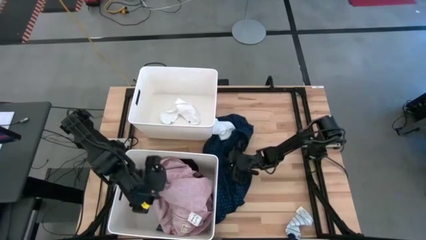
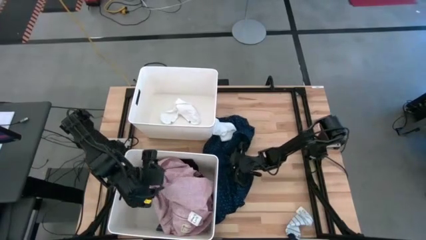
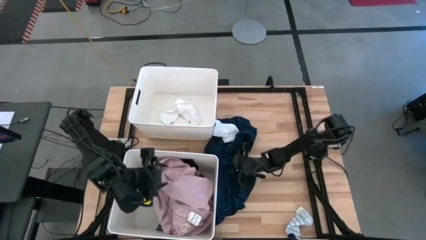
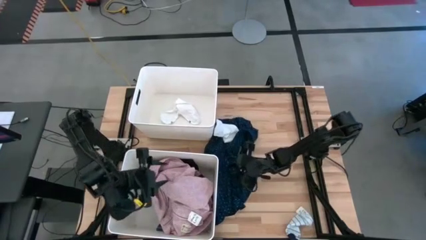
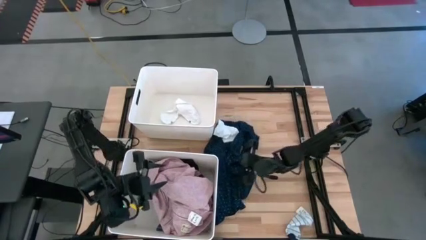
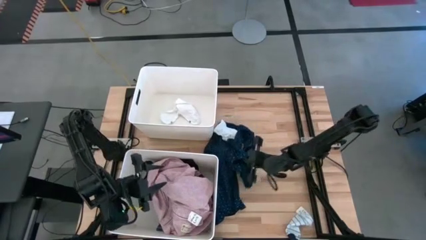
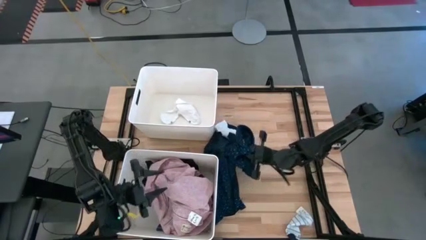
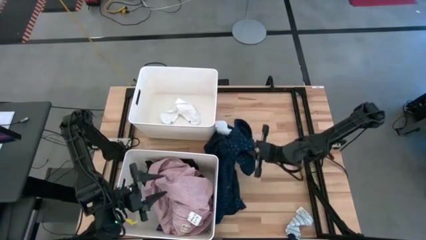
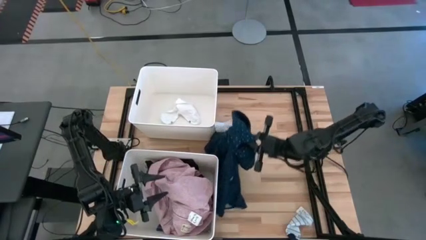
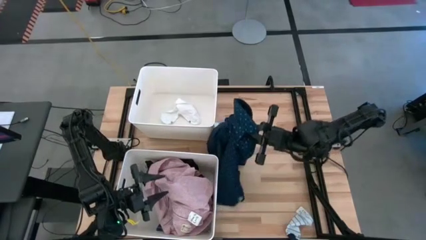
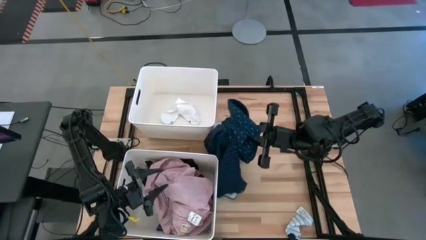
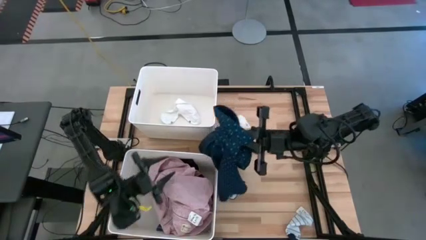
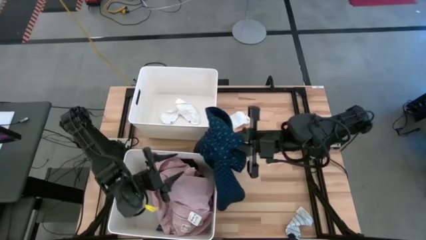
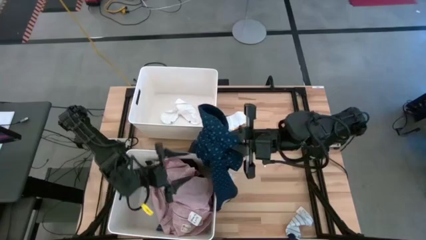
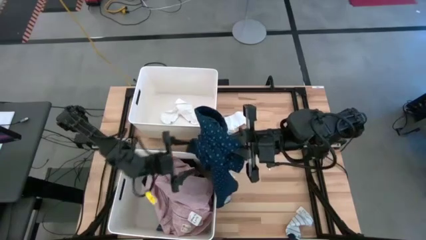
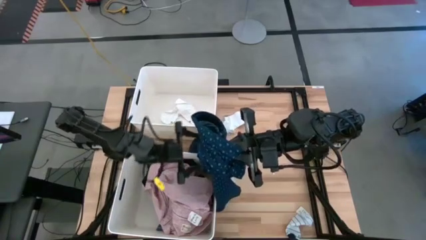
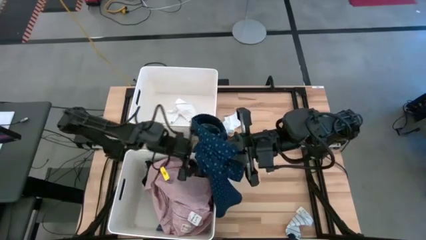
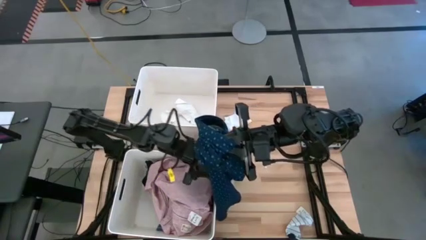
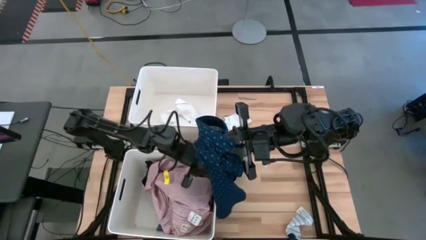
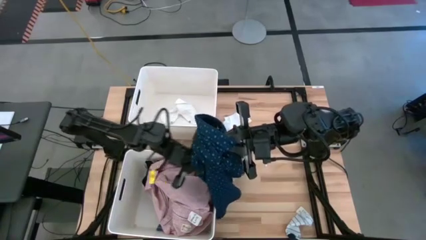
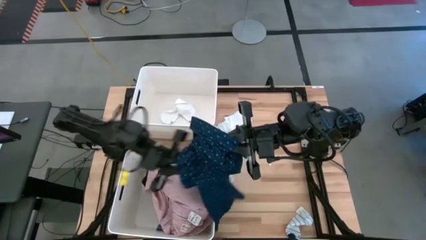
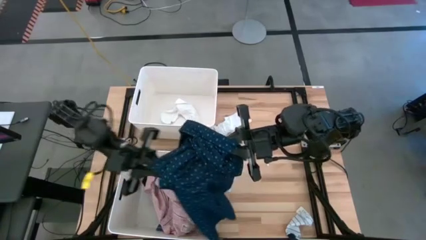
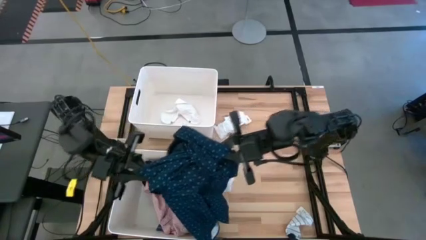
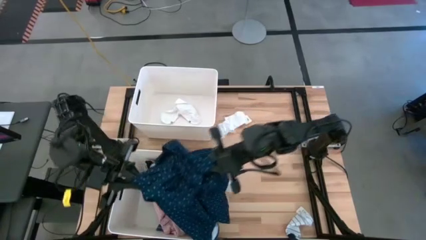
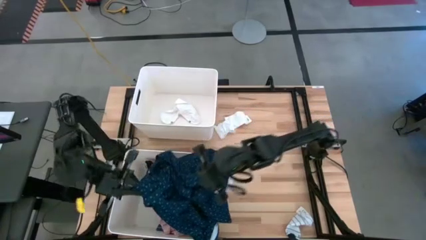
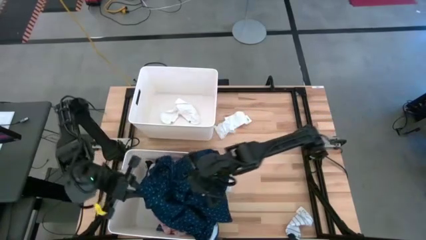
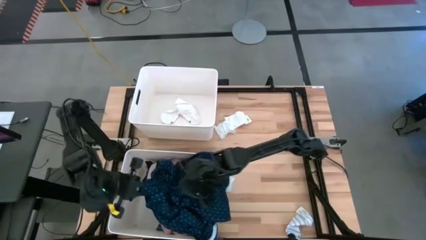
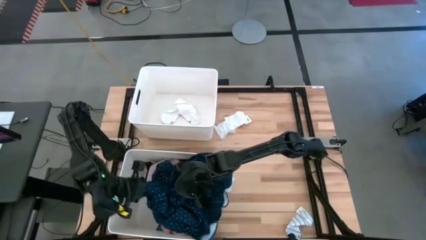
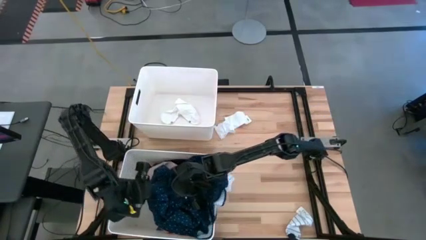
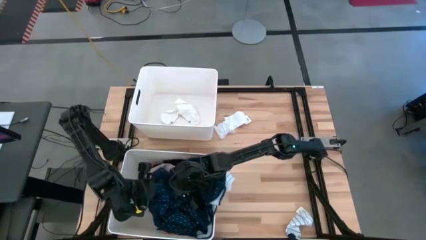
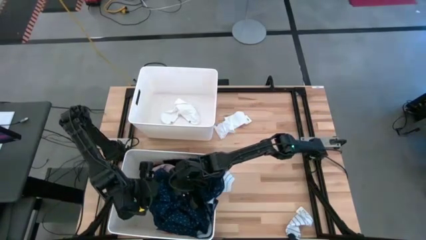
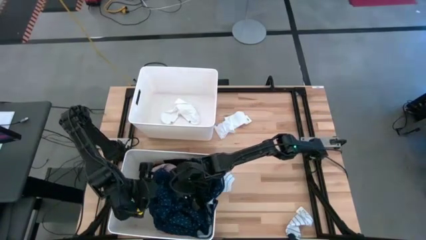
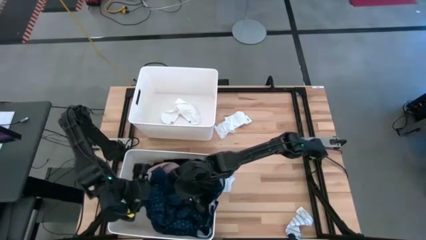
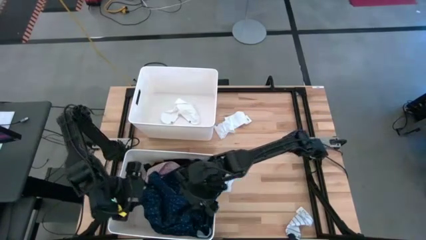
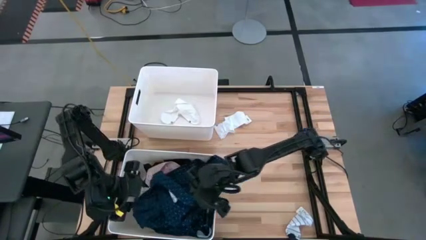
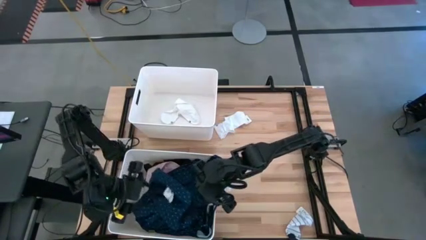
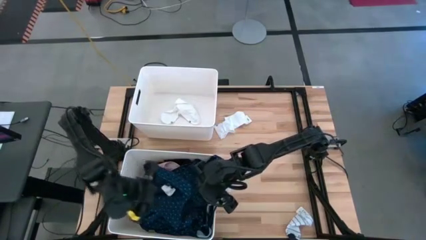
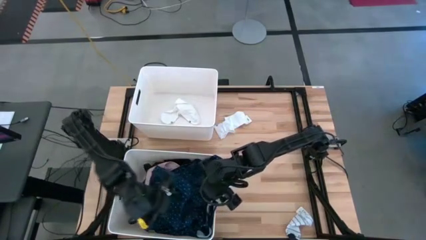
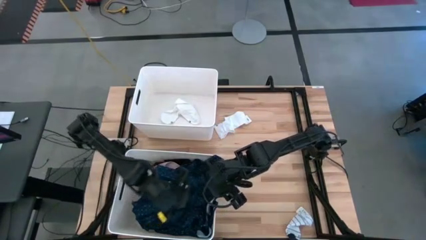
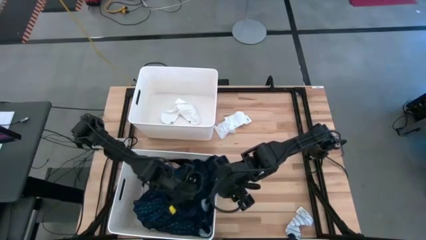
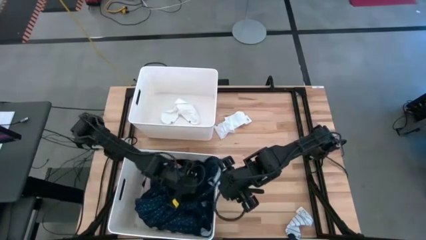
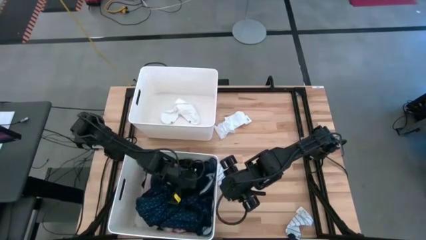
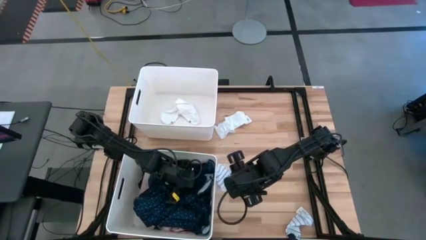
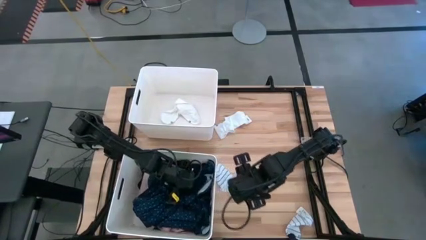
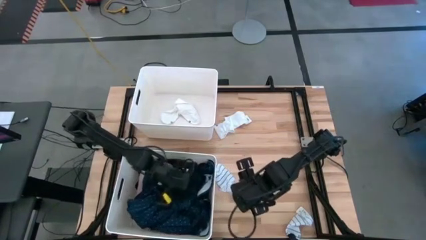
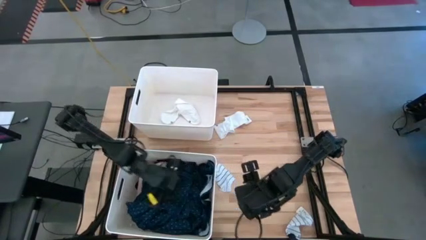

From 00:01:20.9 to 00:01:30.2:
Task: Sort clothes
Put the dark blue shirt into the bottom white laundry organizer

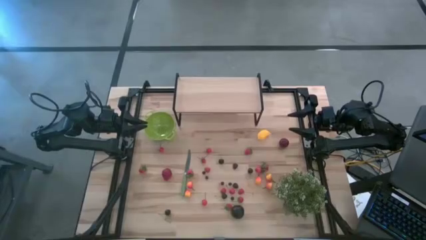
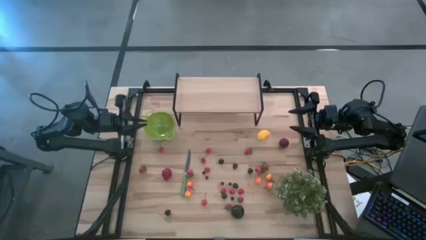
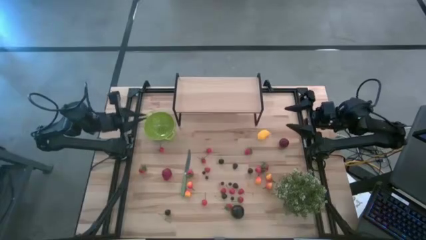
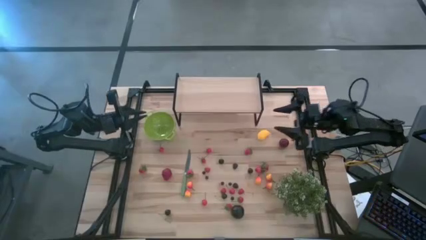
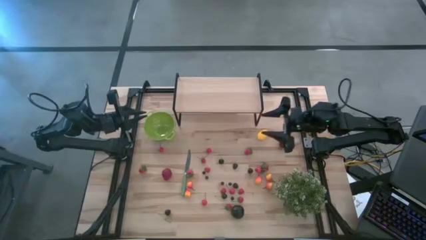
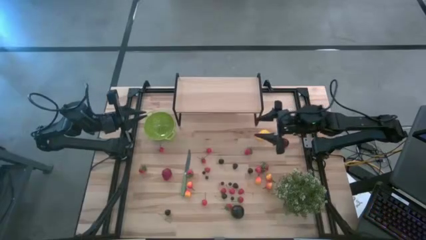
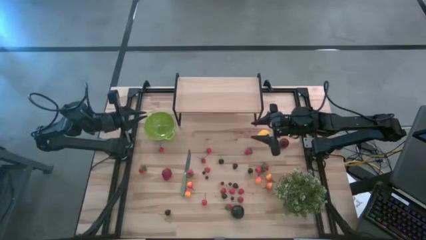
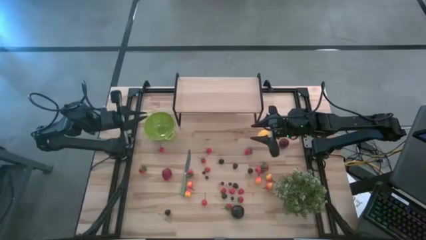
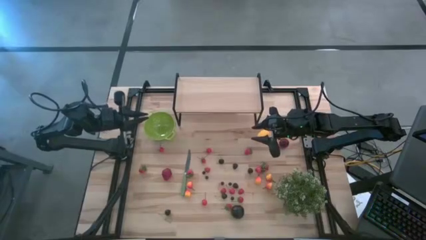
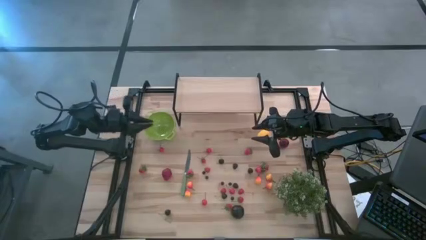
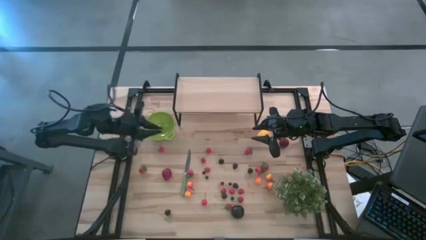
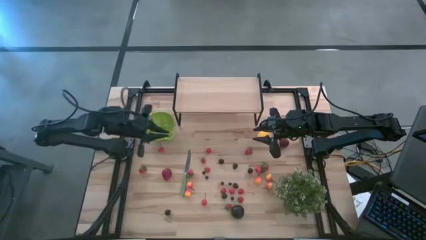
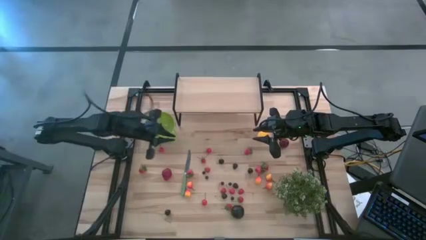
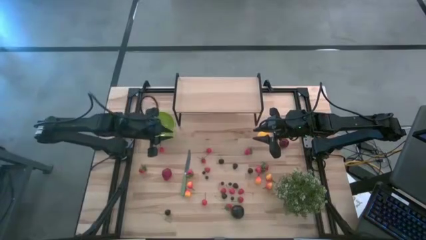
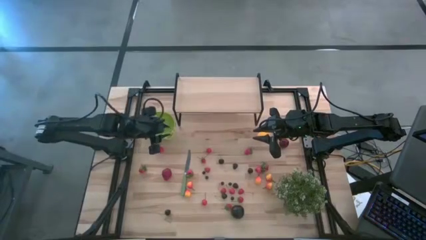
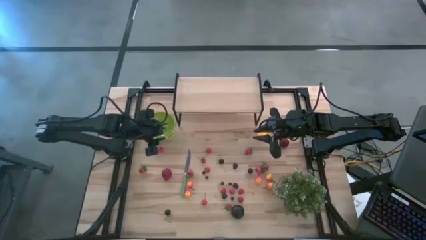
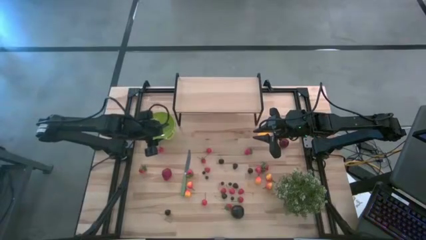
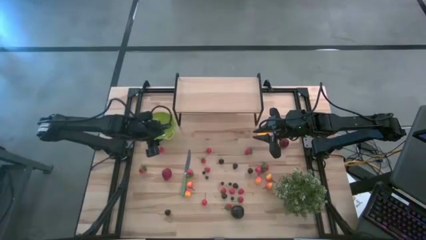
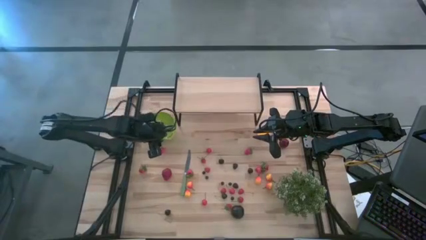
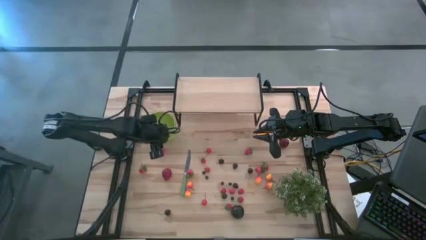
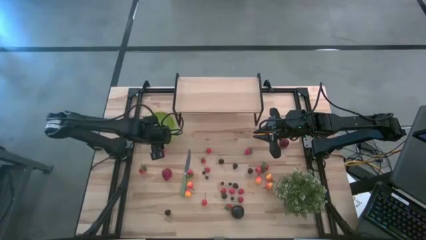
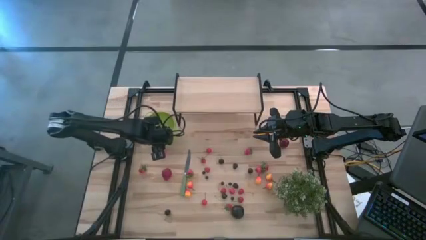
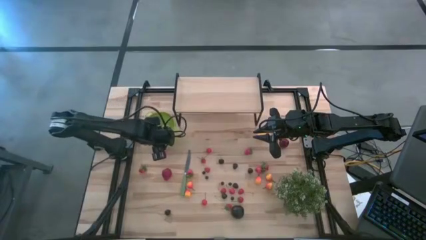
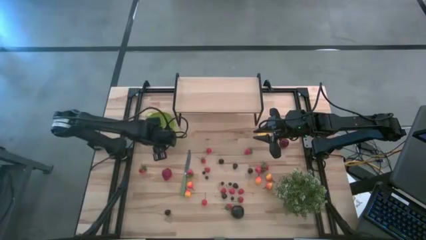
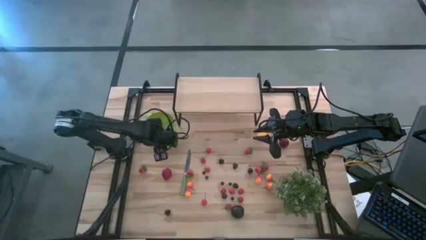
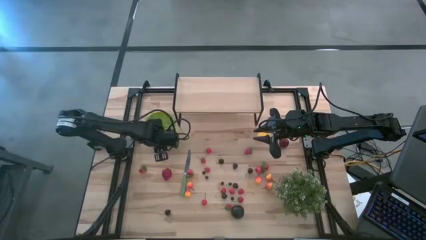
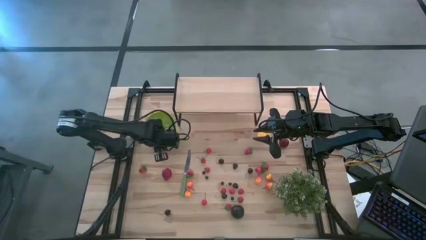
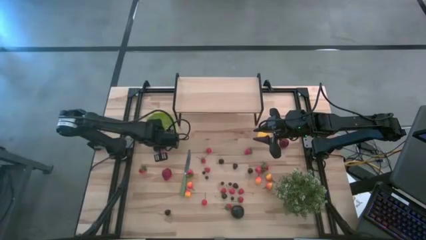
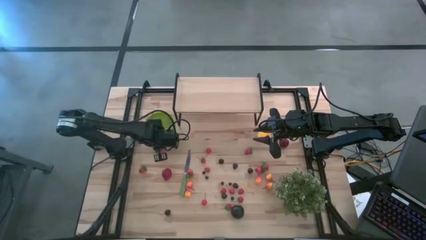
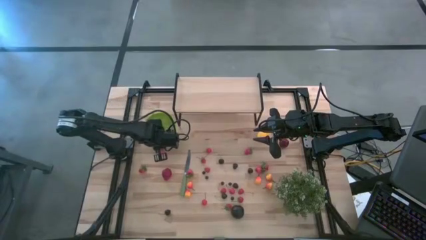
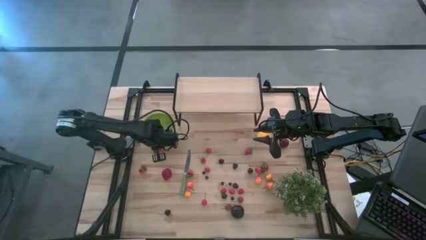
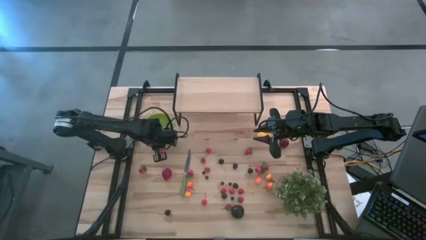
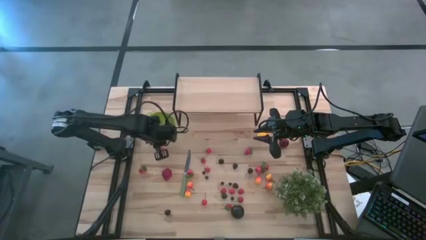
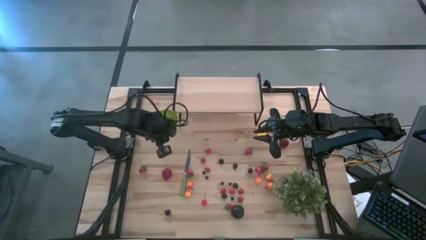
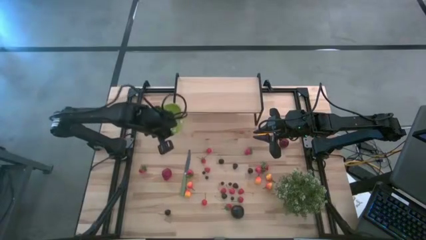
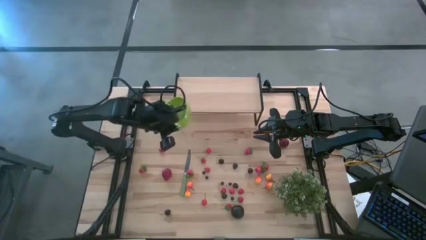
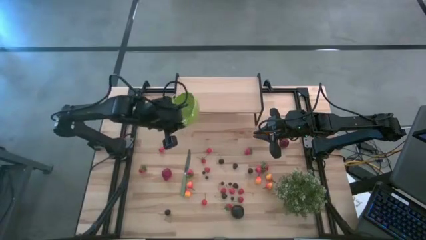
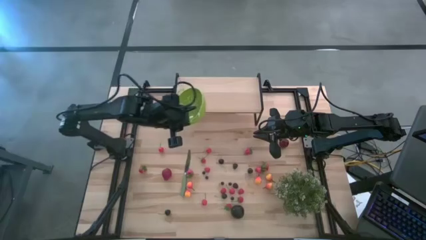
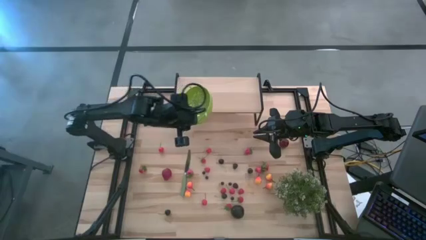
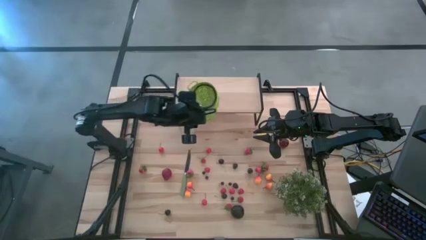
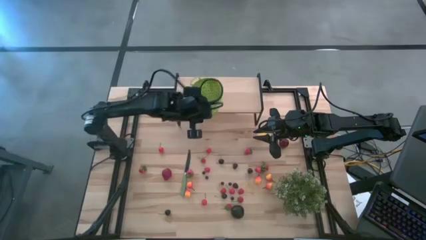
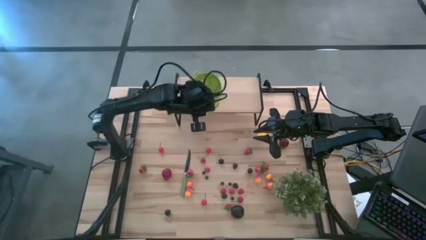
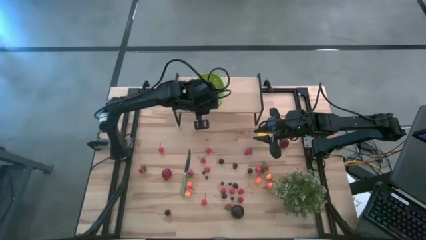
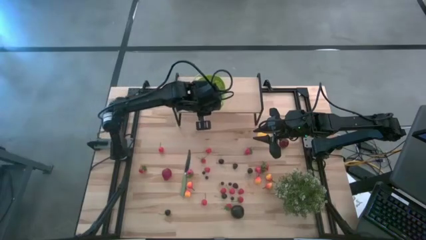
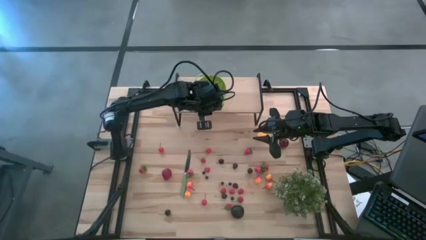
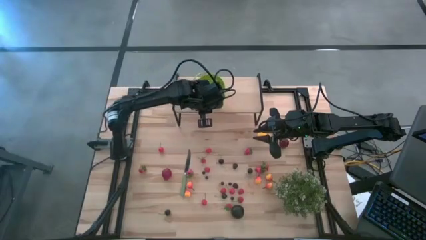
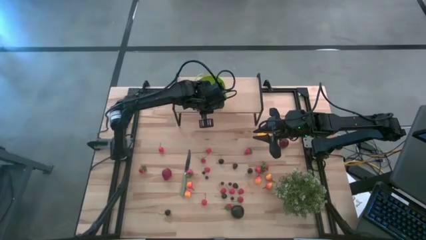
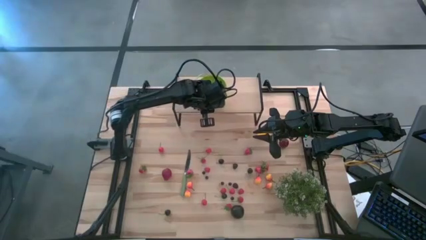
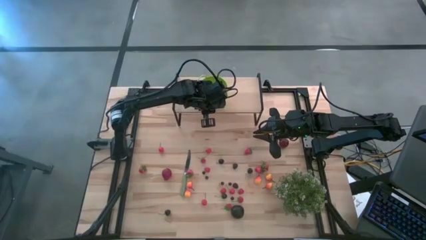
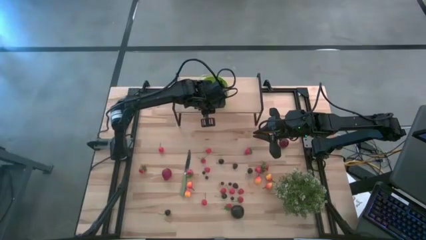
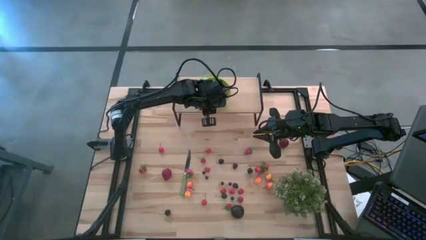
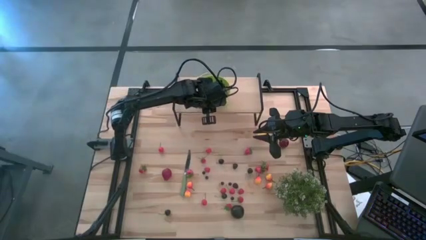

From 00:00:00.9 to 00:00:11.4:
Task: Pick & Place Fruit
Put the green colander on the shelf
